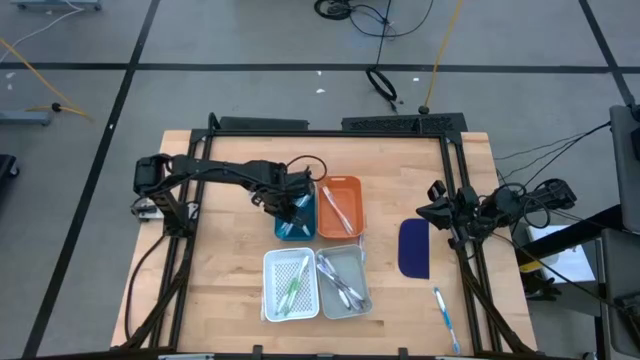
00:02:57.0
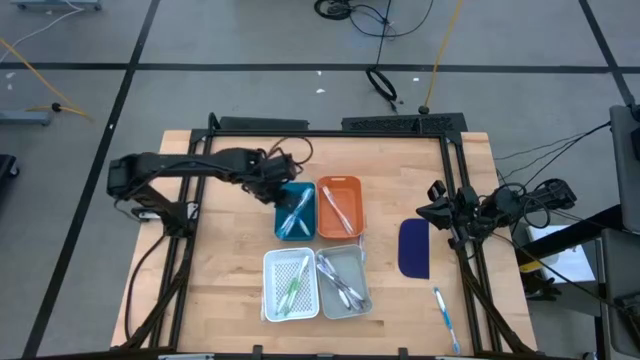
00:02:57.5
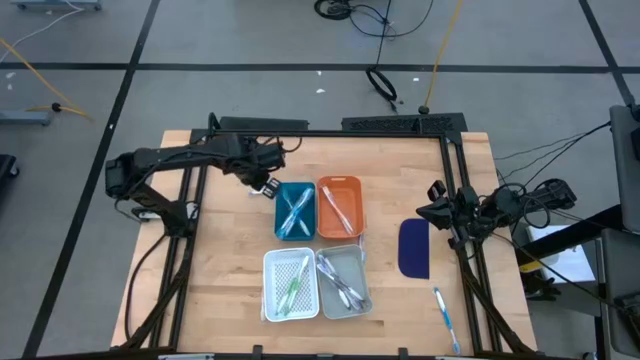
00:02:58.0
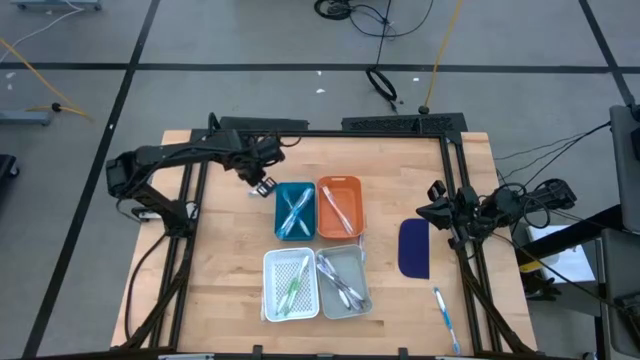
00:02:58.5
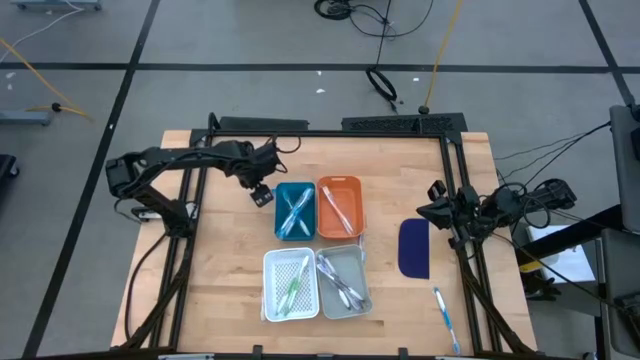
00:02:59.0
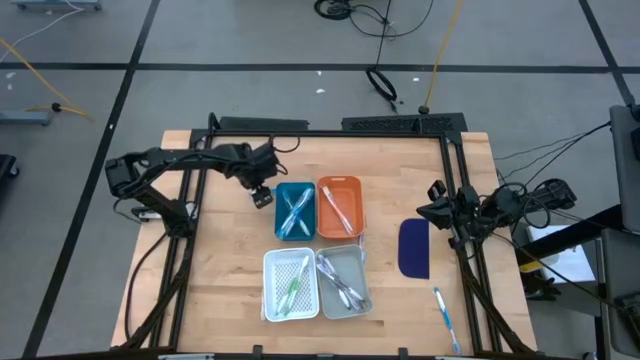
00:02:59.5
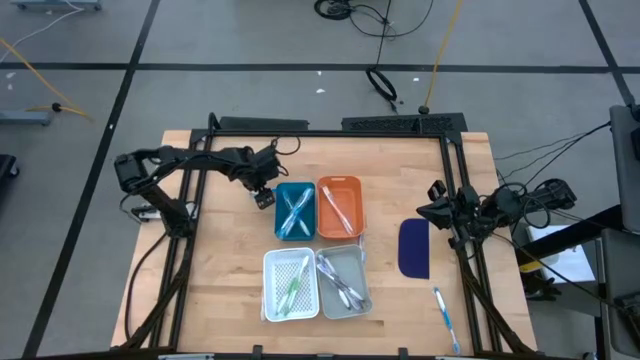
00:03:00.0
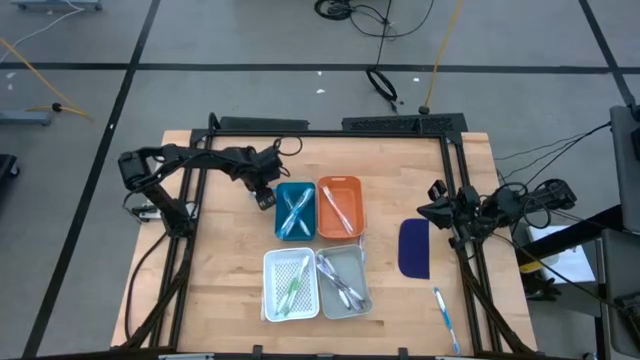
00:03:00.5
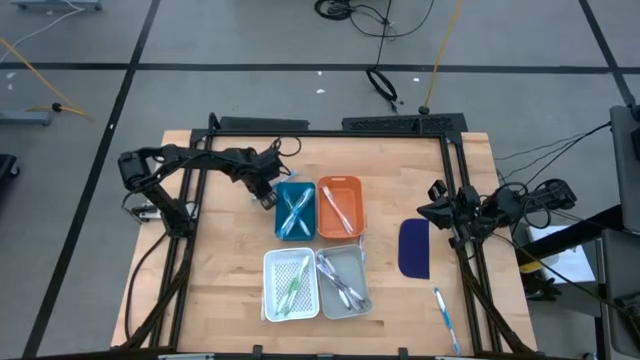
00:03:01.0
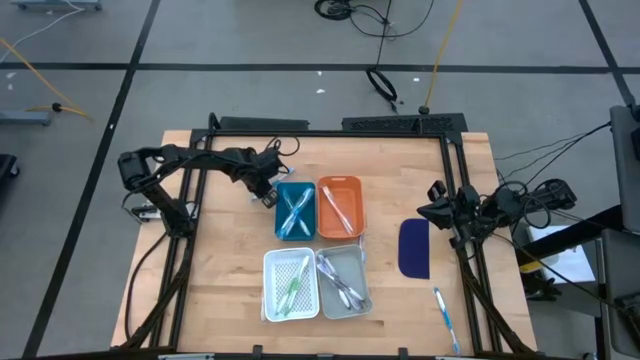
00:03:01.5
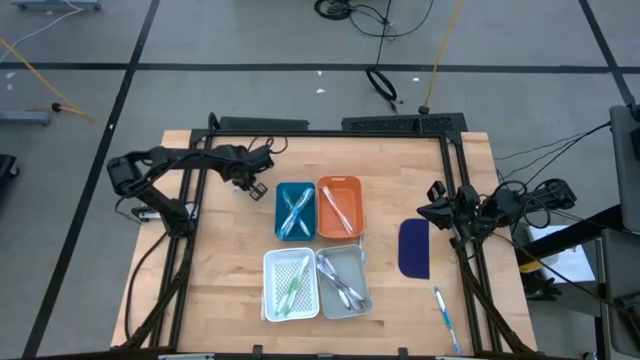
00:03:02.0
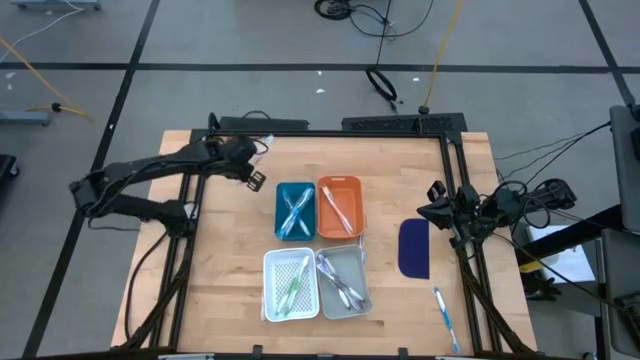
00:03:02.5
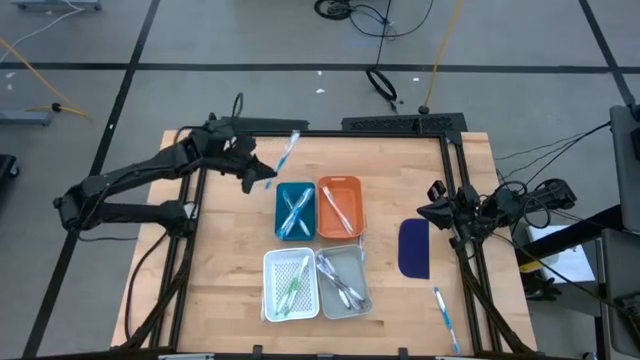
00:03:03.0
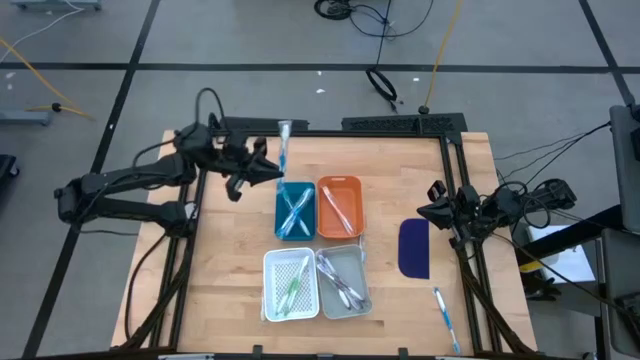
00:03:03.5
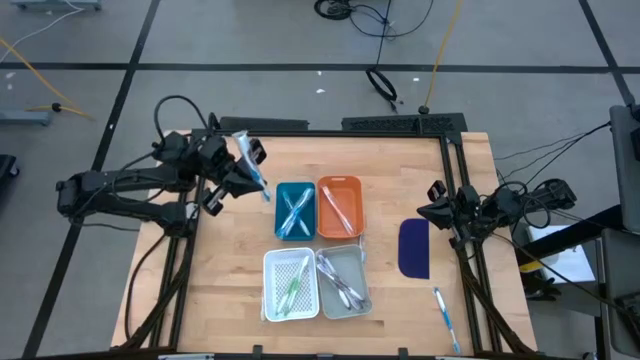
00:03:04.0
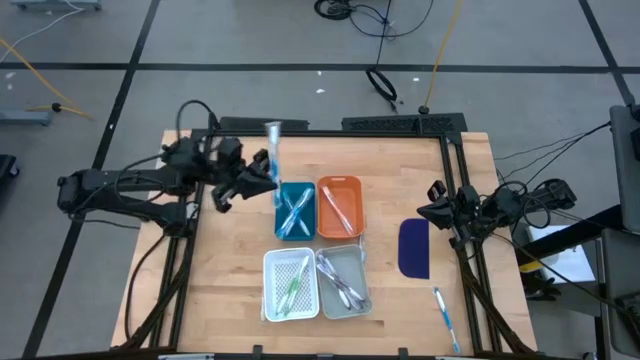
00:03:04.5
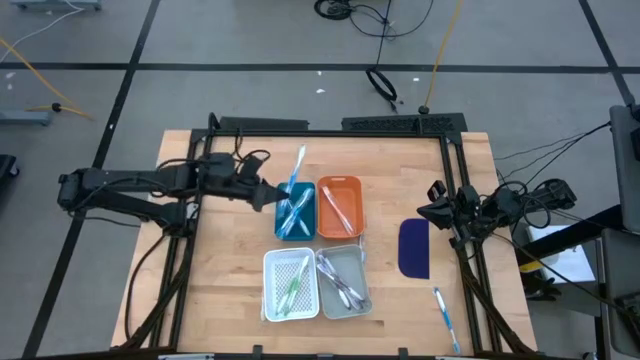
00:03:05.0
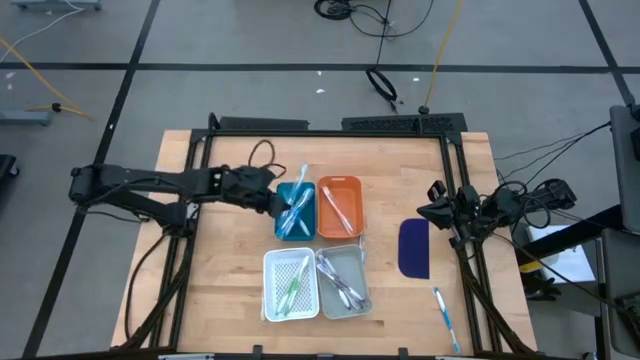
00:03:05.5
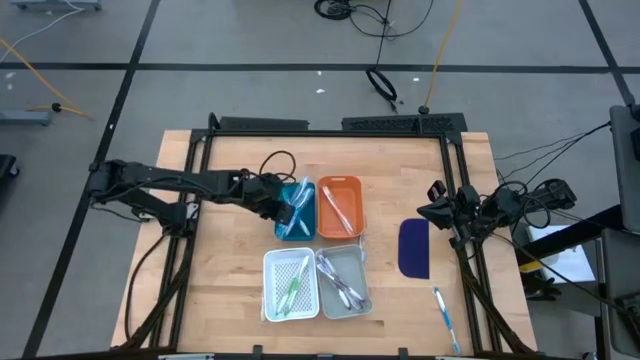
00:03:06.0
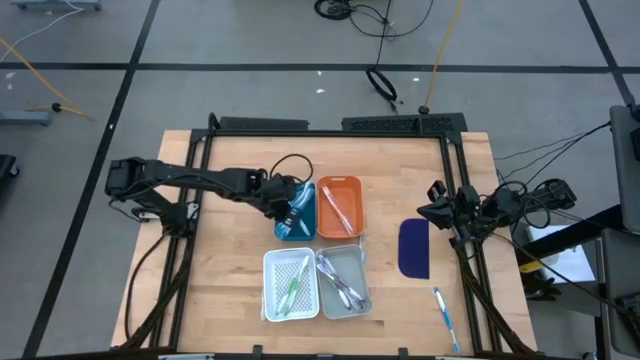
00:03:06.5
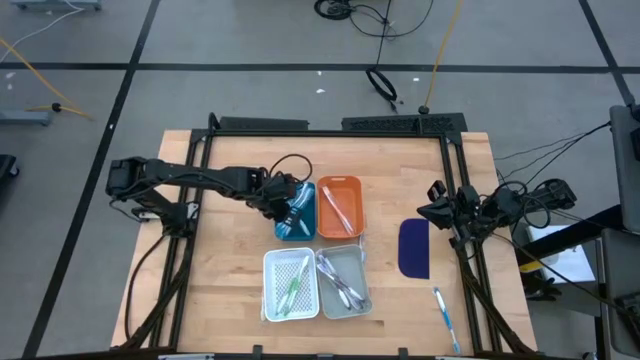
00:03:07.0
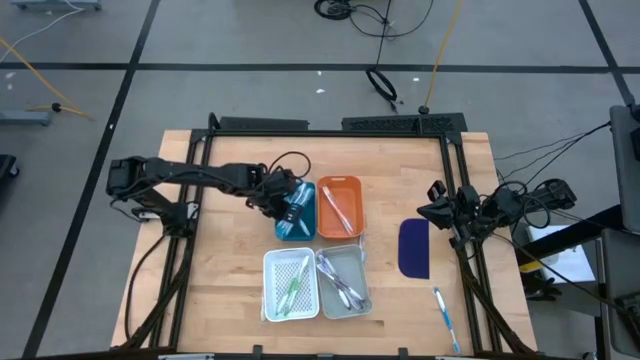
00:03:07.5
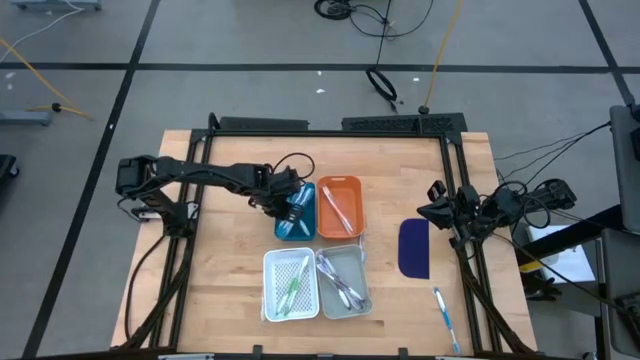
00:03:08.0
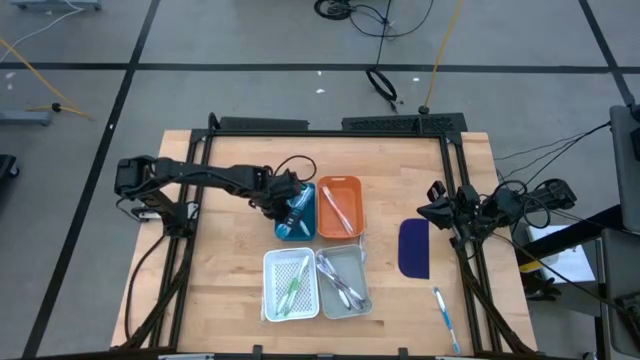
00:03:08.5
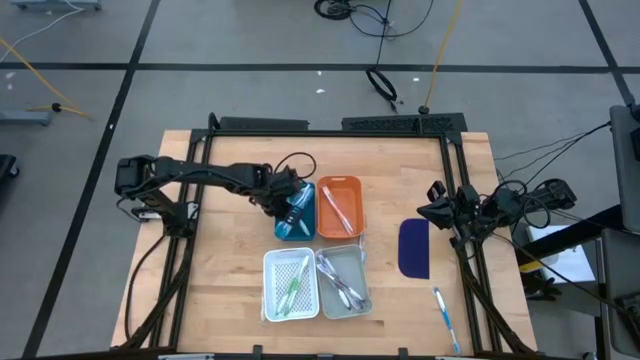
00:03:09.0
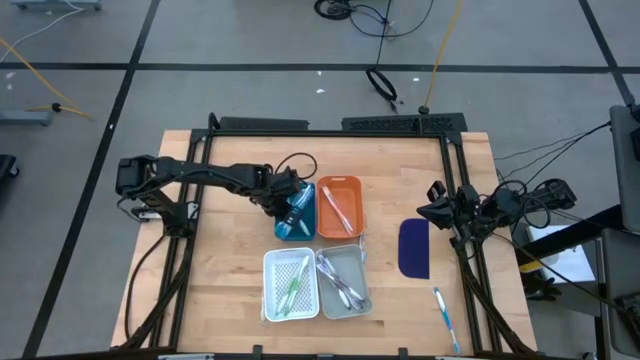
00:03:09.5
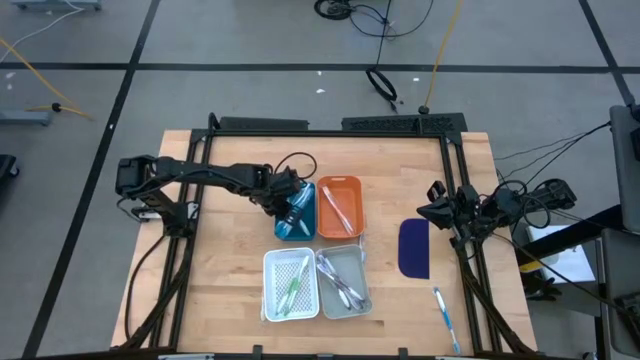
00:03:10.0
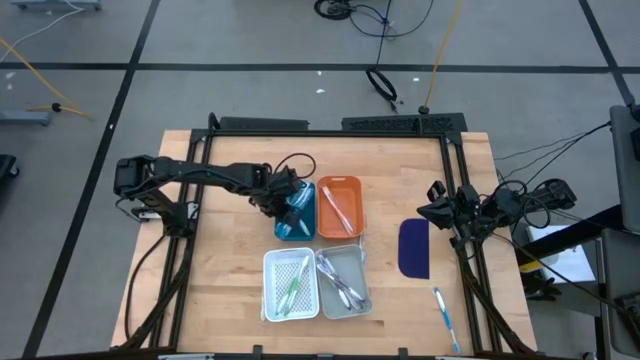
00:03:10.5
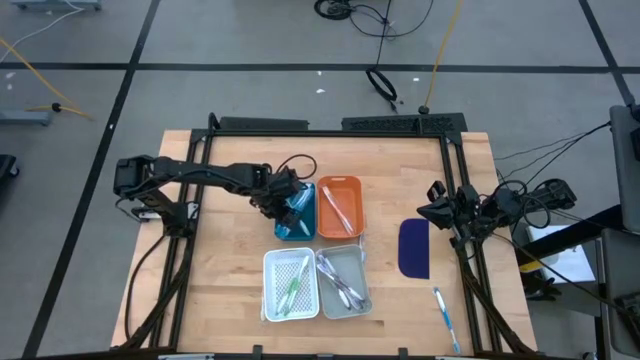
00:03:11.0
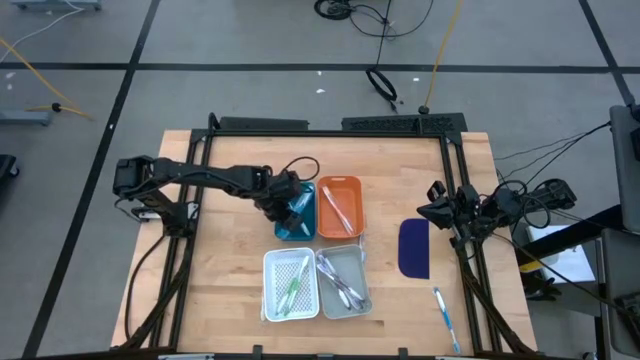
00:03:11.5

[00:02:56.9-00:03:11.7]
Task: Pick & Place Toothbrushes
Put the blue toothbrush into the blue bin

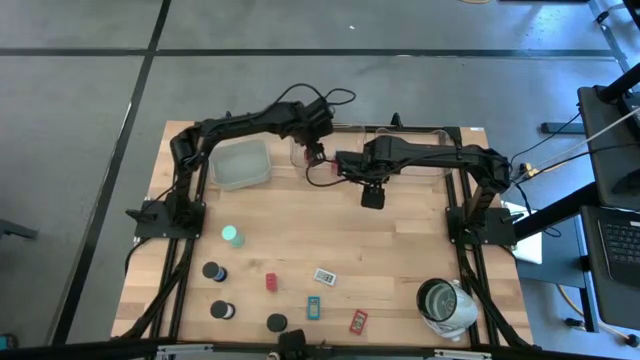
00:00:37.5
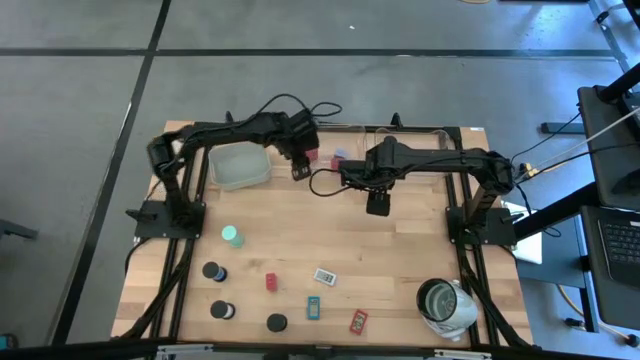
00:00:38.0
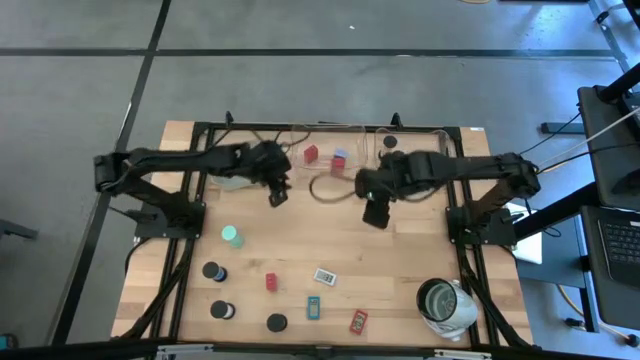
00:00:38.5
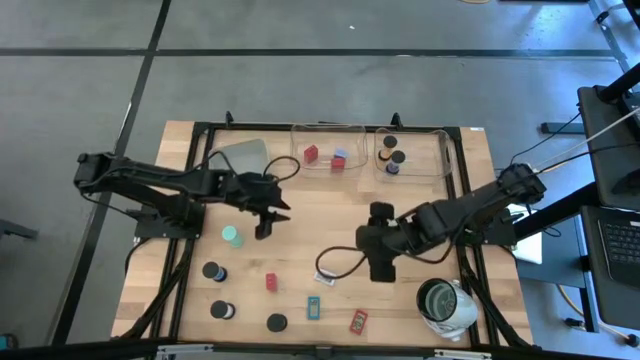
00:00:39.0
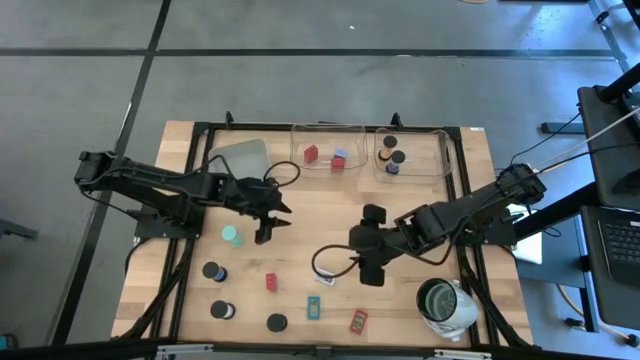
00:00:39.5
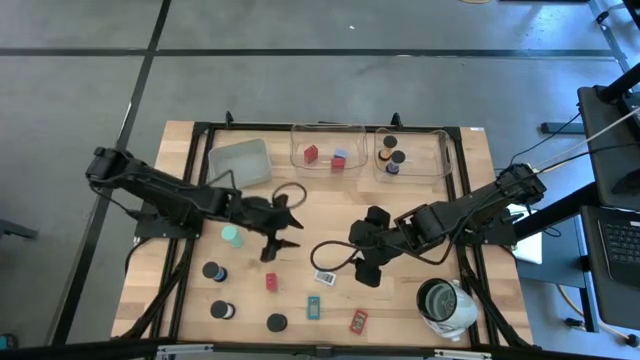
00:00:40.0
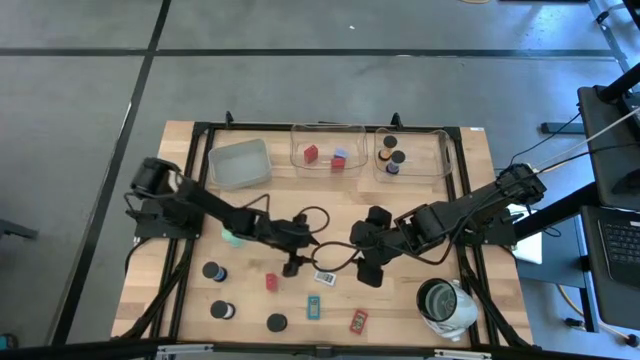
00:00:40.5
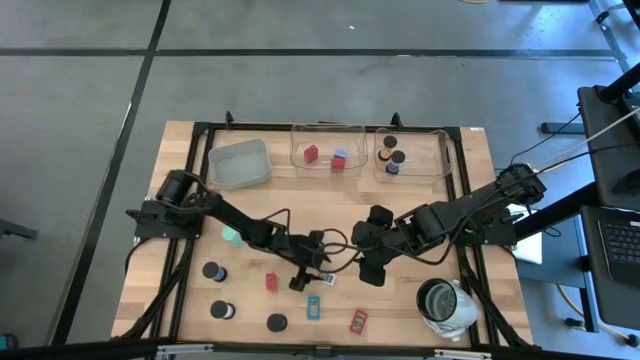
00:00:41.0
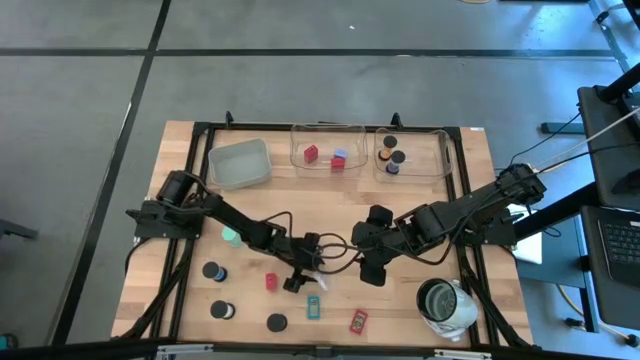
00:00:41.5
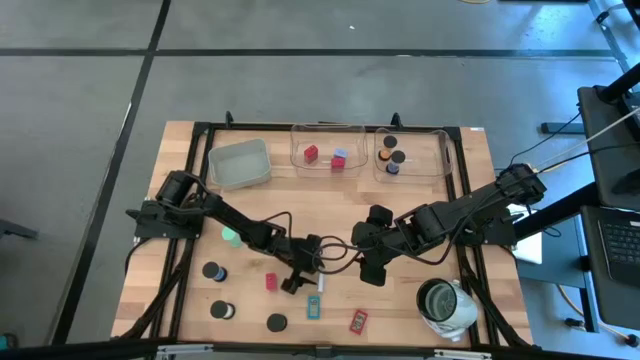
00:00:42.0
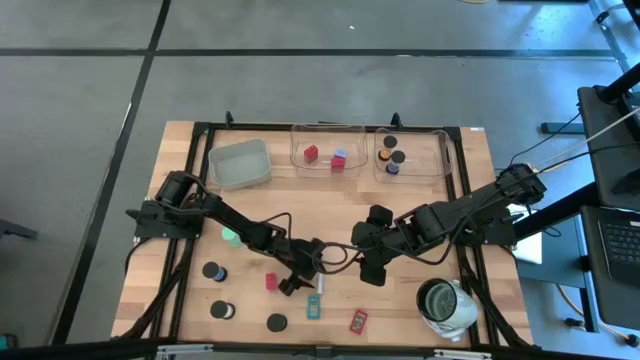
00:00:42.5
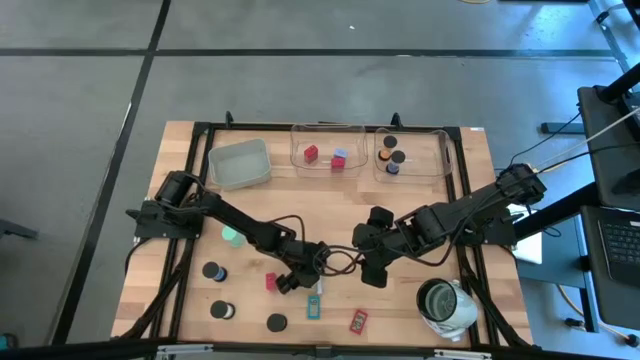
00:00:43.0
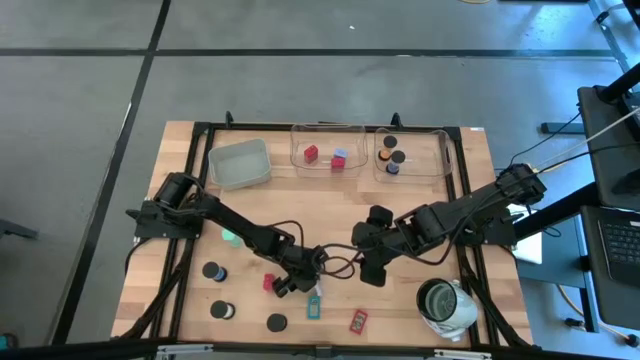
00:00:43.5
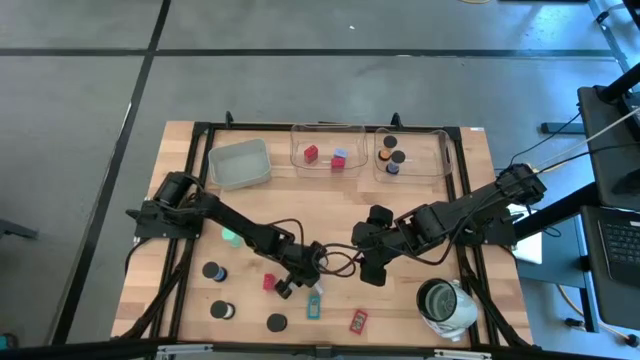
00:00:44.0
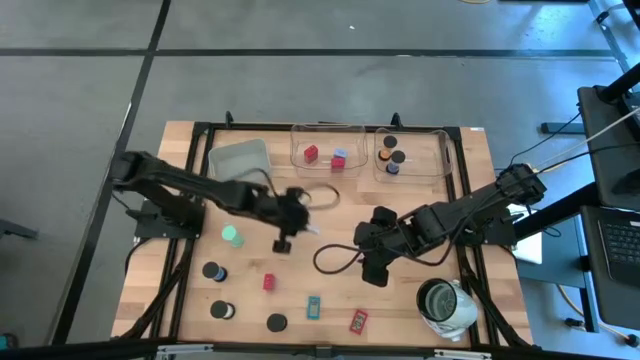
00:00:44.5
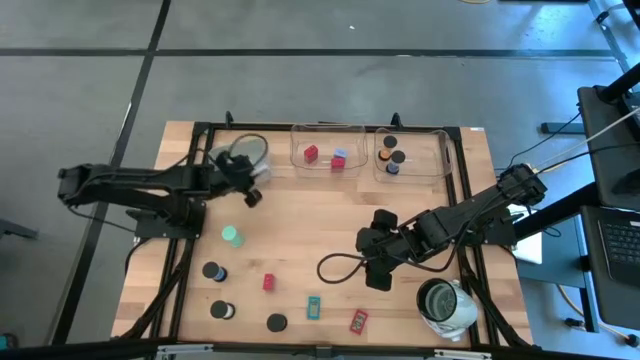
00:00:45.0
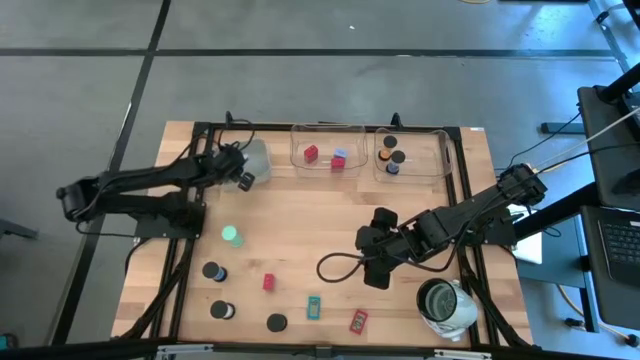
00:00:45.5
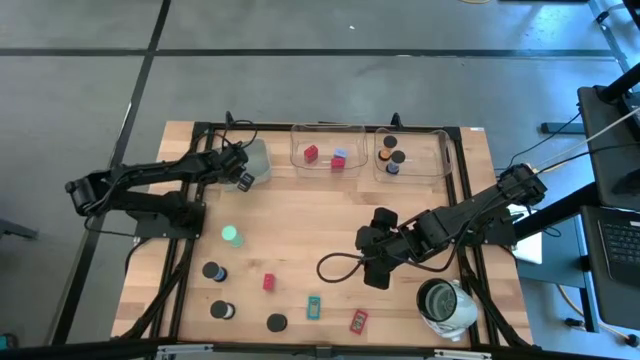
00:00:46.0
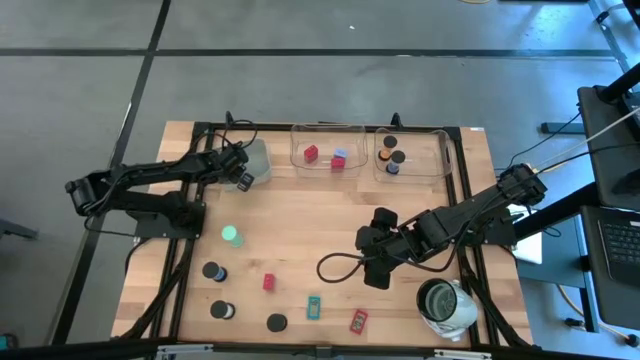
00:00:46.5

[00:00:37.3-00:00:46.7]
Task: Pick & Place Office items
Put the white digital timer into the gray bin
